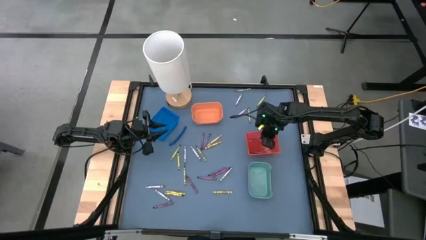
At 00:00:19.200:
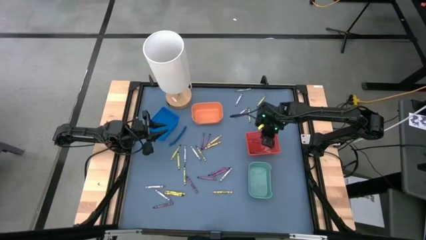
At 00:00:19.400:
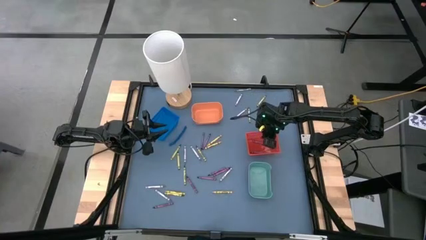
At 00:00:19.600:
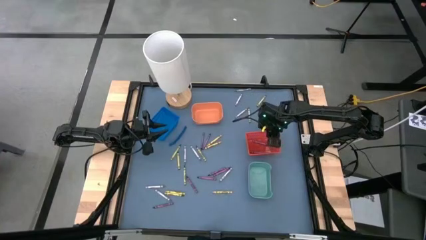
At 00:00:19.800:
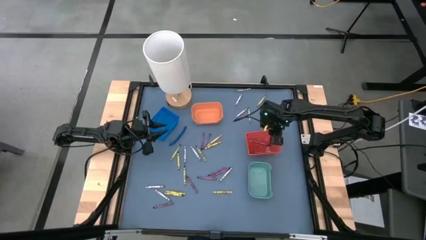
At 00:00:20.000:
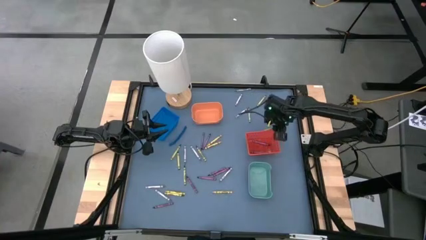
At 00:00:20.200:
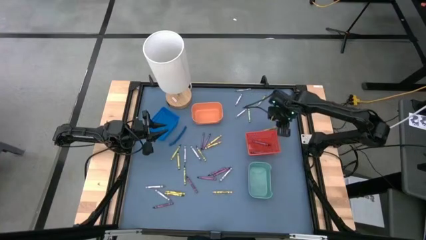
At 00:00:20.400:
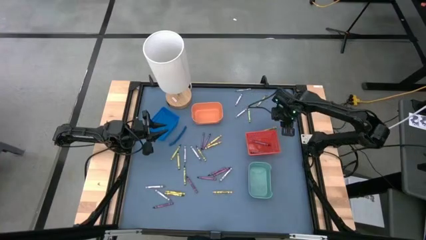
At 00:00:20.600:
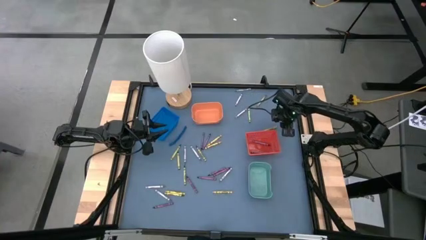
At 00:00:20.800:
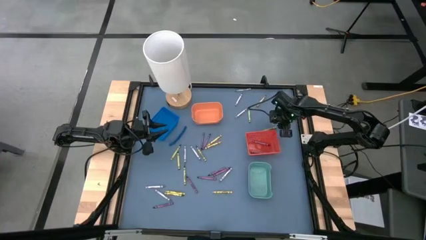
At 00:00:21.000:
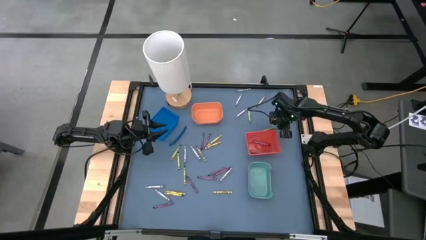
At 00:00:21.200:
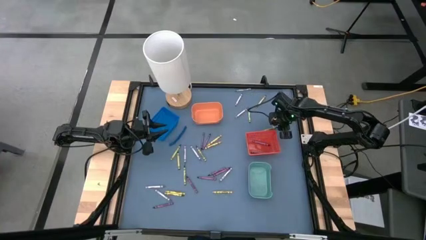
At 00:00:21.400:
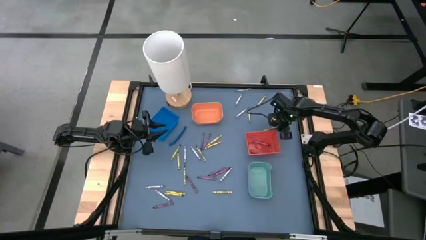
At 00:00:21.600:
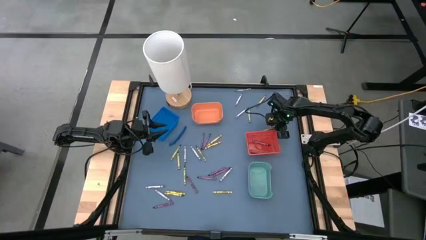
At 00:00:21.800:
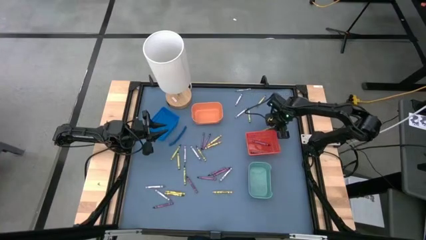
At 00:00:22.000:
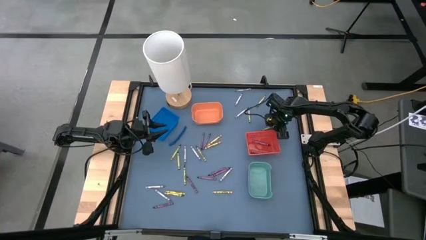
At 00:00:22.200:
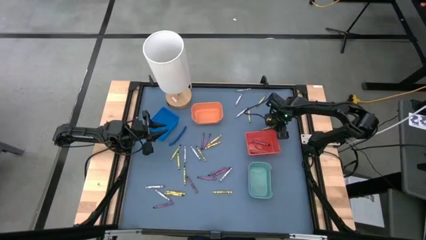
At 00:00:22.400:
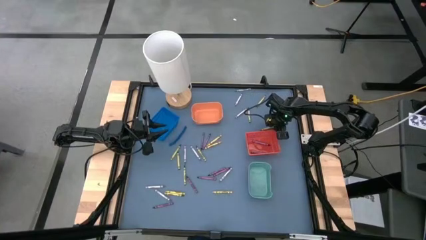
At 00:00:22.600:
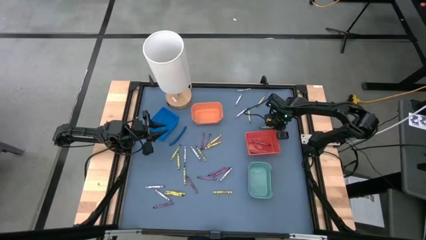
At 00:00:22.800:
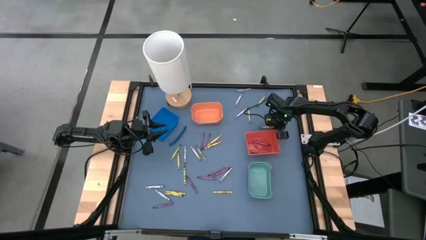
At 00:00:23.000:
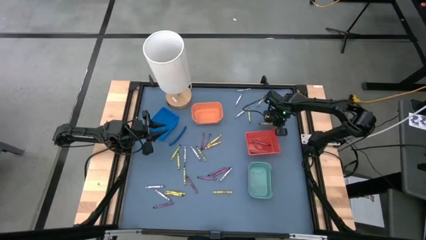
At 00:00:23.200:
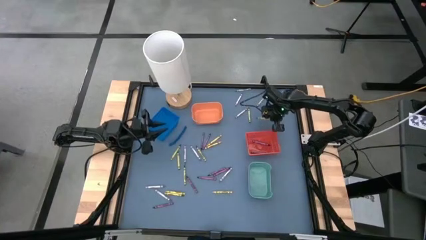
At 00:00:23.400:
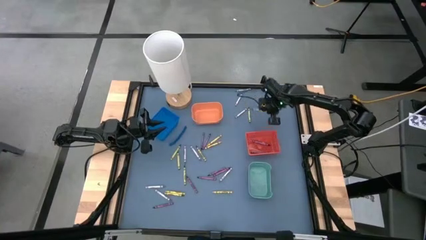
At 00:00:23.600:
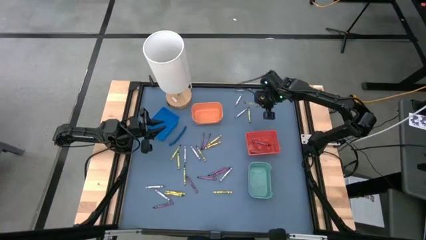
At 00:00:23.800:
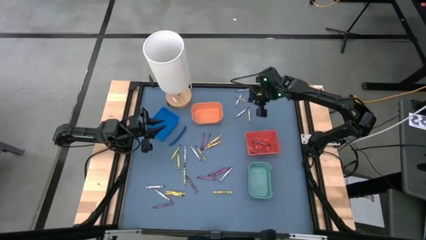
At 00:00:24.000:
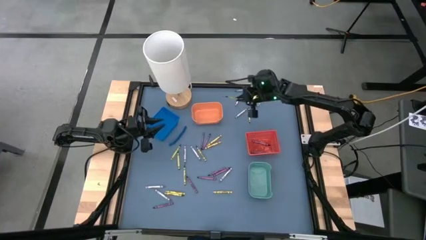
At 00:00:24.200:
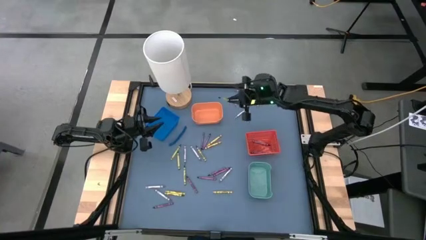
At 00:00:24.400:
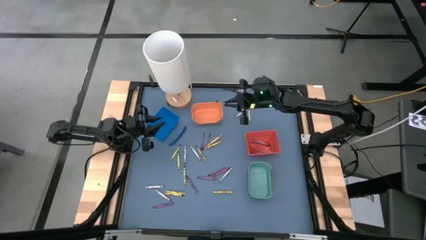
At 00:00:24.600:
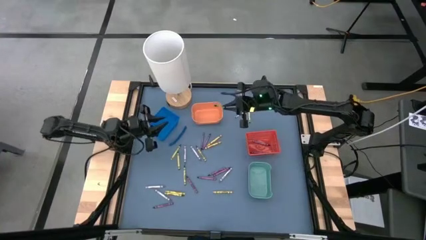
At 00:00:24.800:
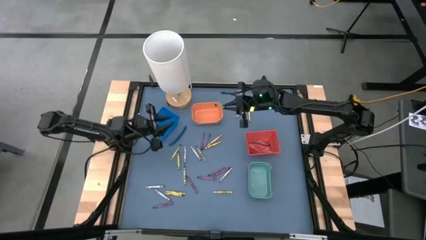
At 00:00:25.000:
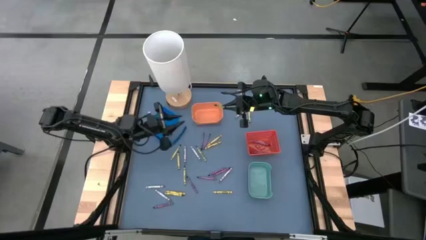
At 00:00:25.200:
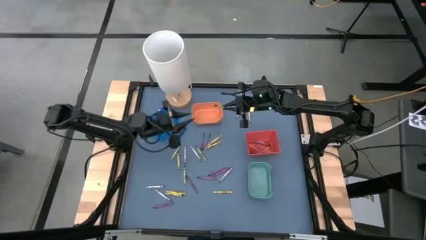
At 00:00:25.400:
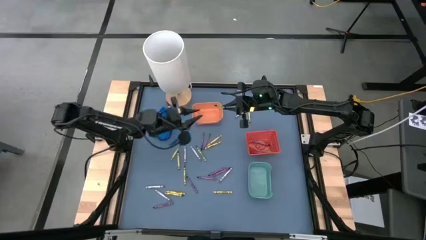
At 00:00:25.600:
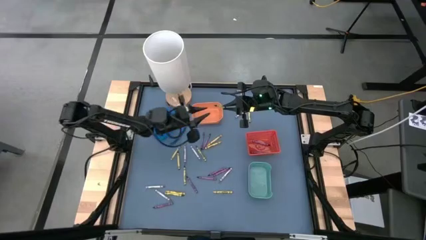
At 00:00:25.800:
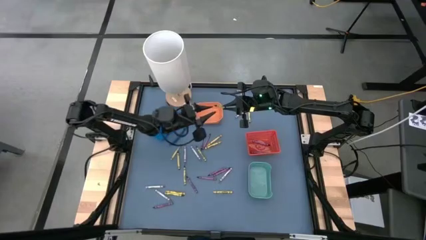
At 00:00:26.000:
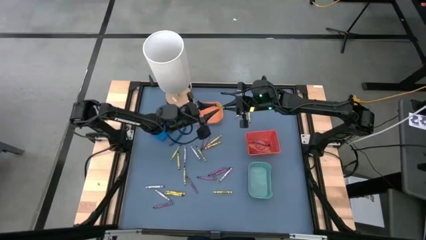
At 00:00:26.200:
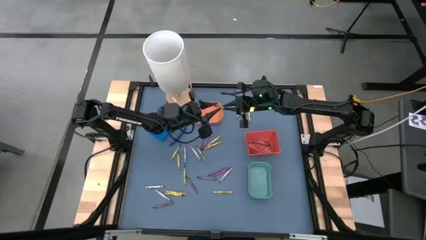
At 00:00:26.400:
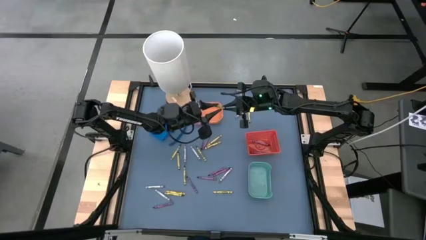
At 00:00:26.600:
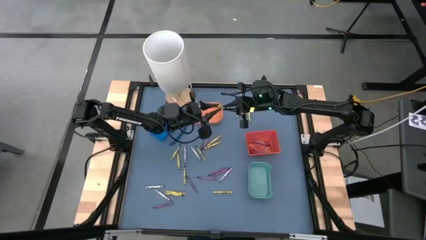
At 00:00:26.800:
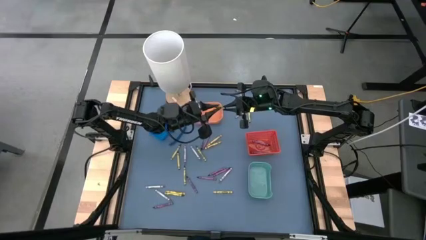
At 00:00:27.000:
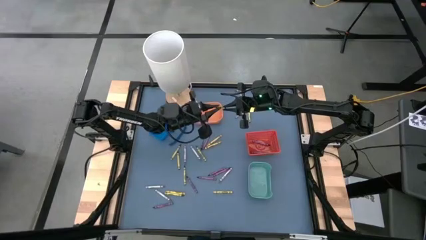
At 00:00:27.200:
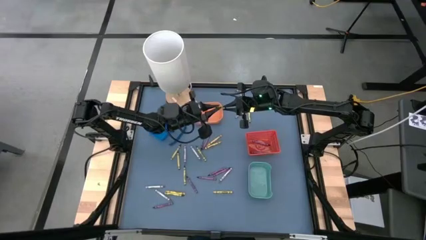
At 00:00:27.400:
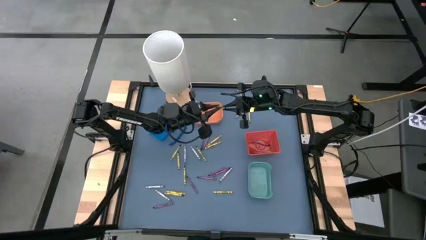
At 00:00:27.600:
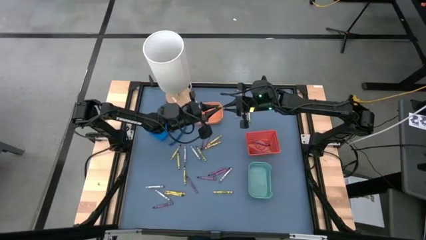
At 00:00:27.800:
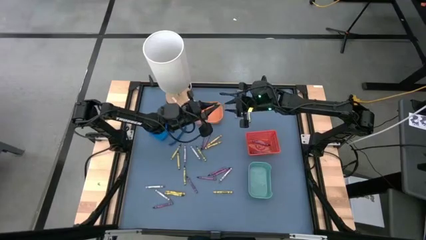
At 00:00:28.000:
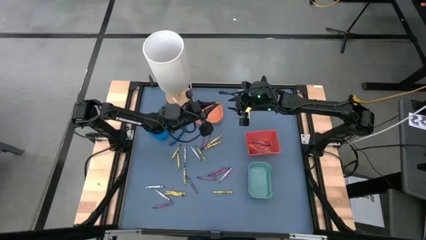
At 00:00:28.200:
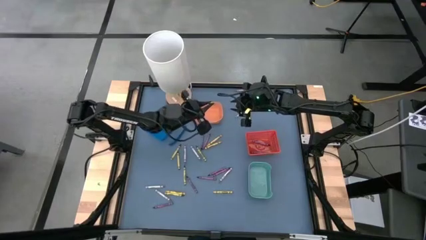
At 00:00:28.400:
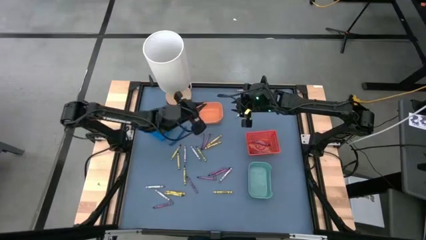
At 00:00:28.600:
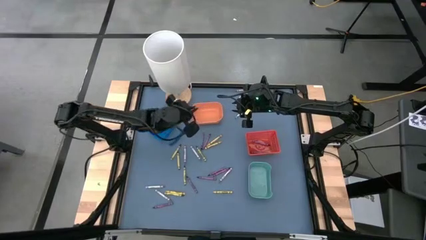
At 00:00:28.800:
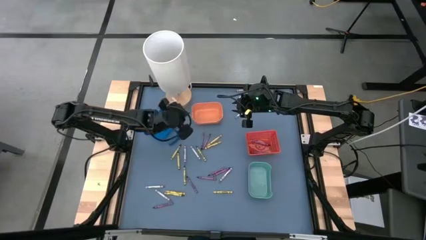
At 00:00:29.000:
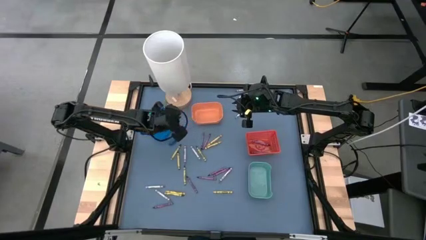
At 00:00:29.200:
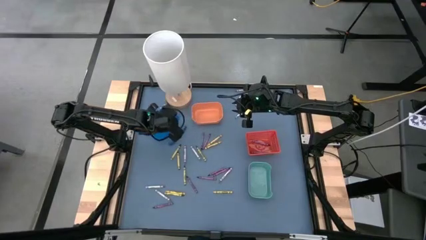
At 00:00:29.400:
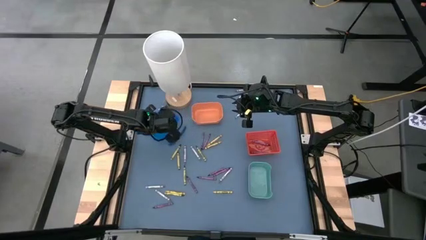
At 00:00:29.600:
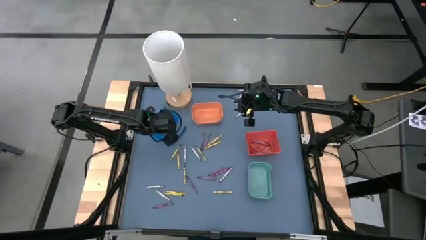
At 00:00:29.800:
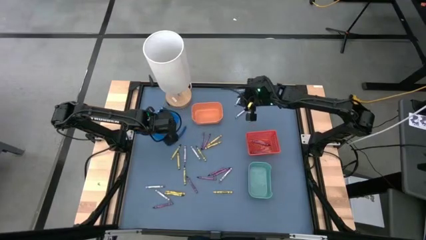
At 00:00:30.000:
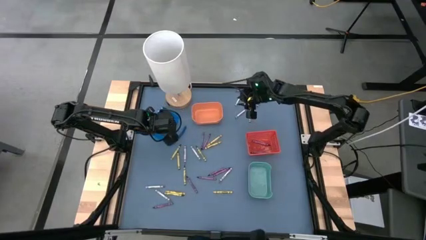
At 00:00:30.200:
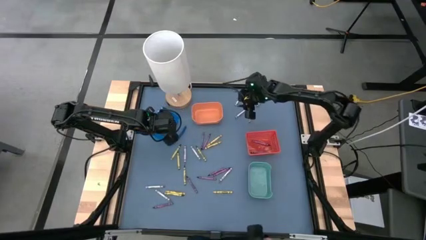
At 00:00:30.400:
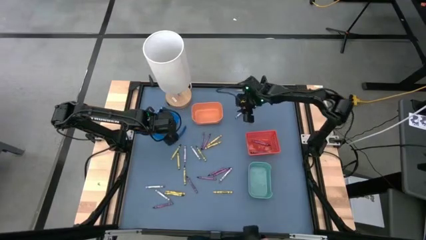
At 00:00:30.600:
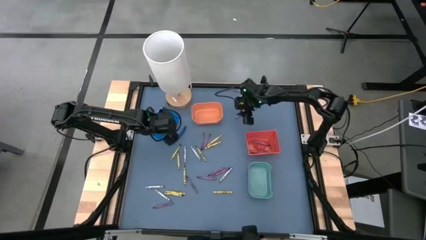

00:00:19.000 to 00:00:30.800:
Task: Sort crayons
Put the green crayon into the dark blue bin

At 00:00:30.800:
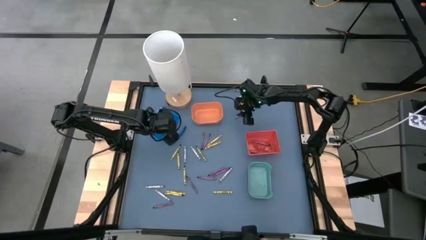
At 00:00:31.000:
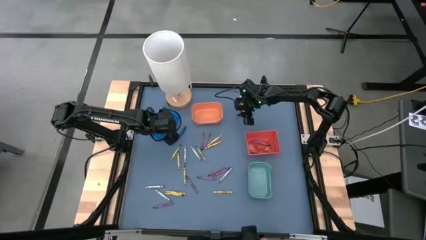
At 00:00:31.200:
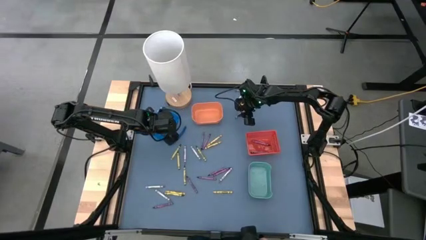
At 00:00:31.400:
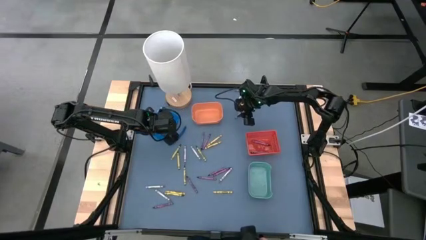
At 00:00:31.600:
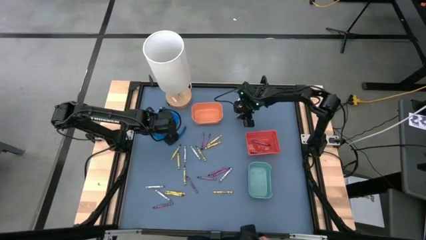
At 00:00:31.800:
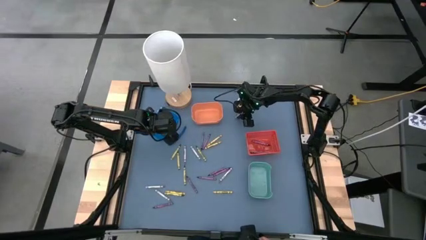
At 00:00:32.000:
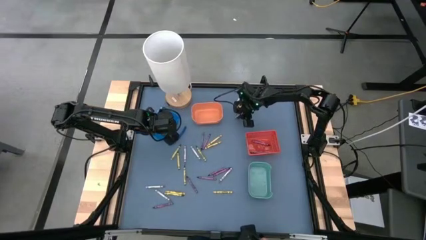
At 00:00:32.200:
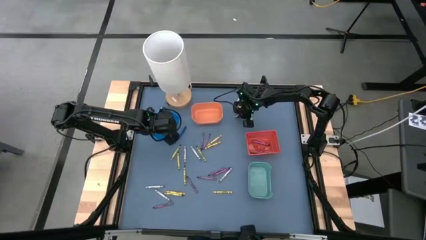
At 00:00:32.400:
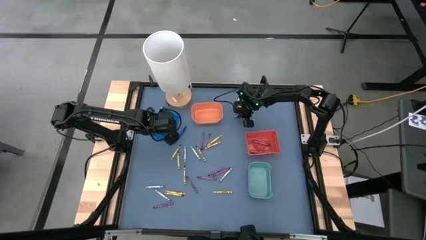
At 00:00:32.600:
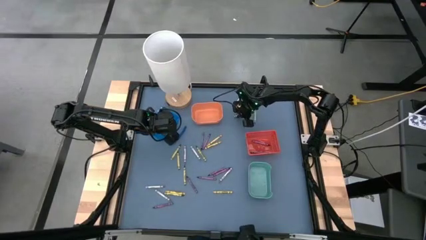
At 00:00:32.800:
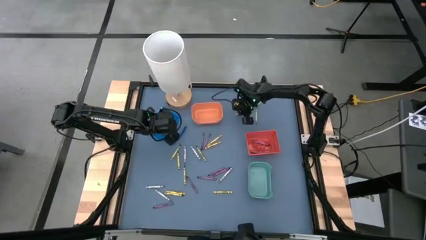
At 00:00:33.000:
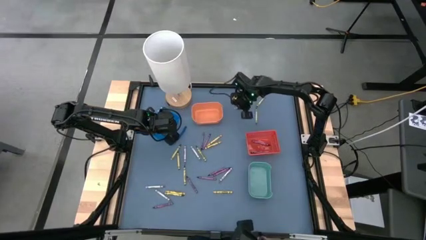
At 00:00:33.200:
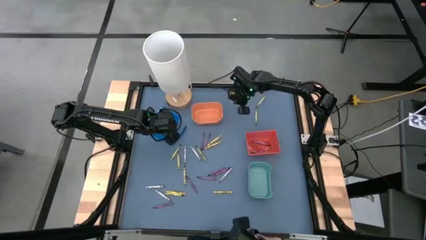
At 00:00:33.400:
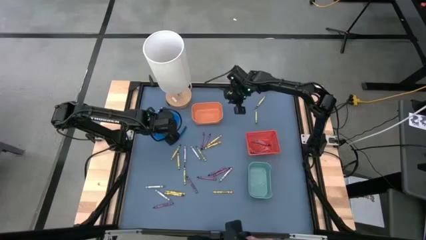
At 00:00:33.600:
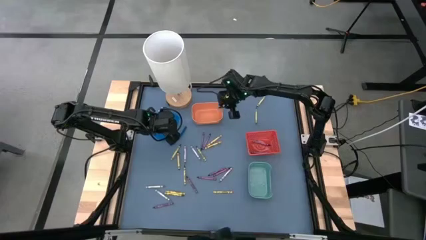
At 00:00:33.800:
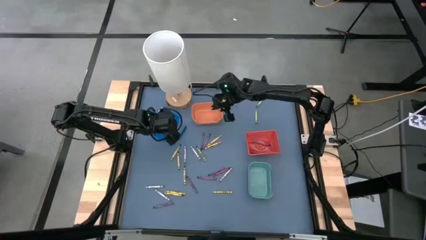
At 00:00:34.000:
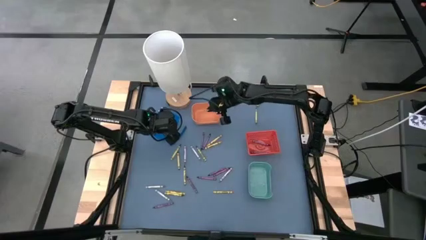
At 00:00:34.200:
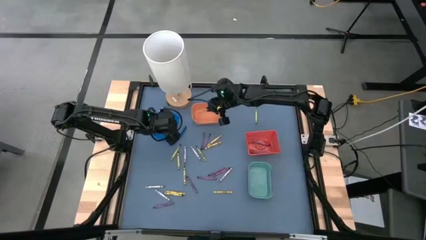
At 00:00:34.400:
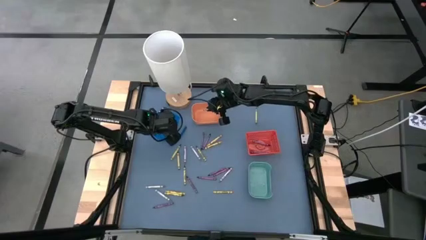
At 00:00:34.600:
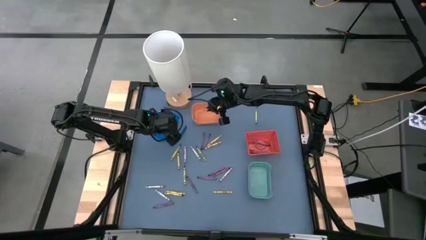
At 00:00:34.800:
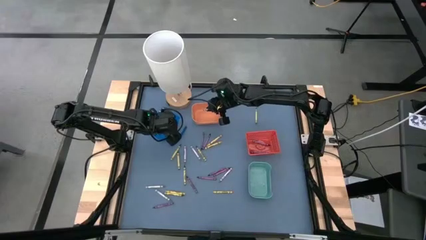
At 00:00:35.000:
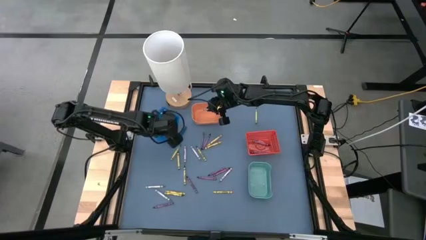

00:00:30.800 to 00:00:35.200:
Put the gray crayon into the orange bin
